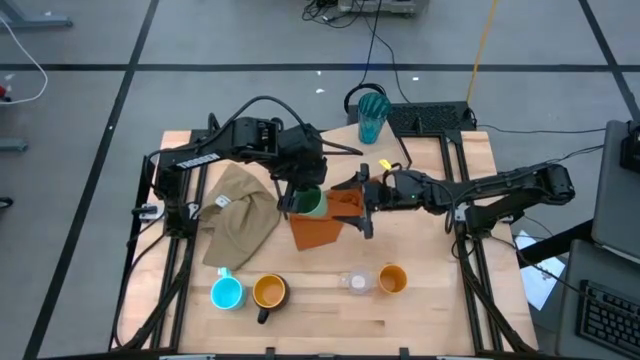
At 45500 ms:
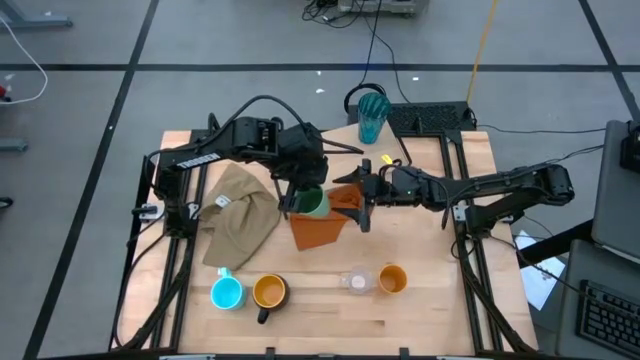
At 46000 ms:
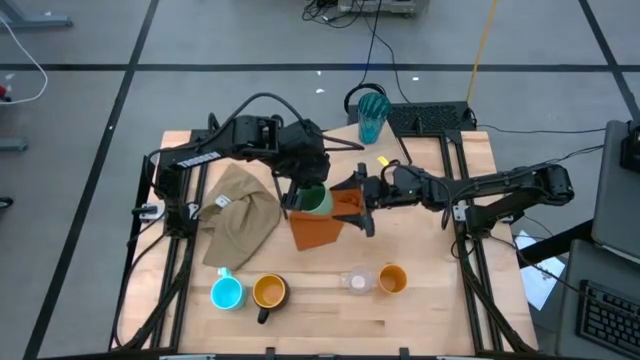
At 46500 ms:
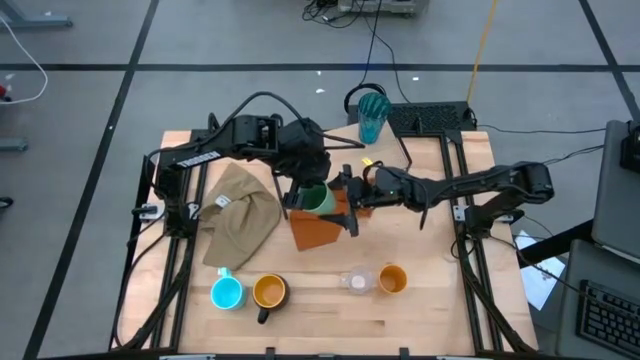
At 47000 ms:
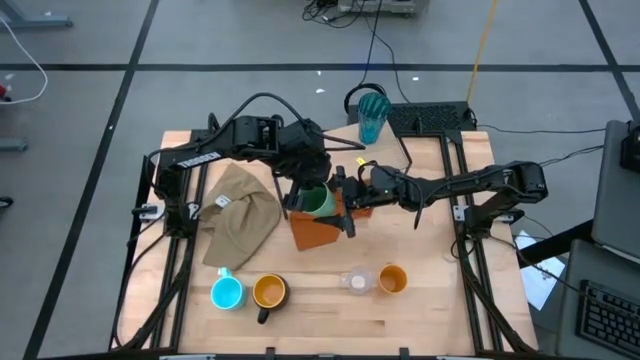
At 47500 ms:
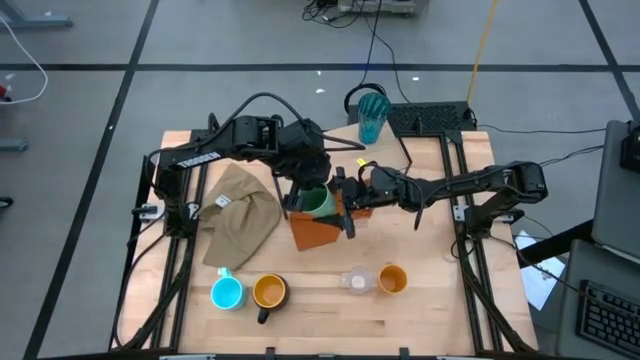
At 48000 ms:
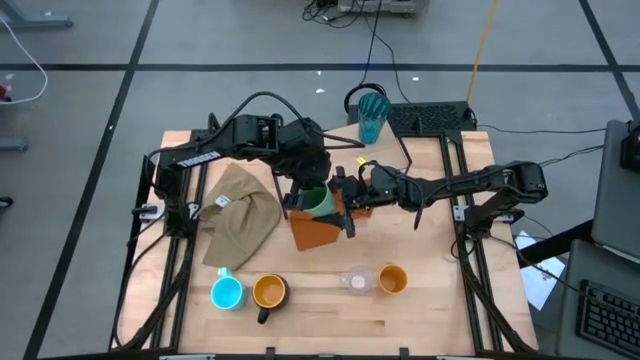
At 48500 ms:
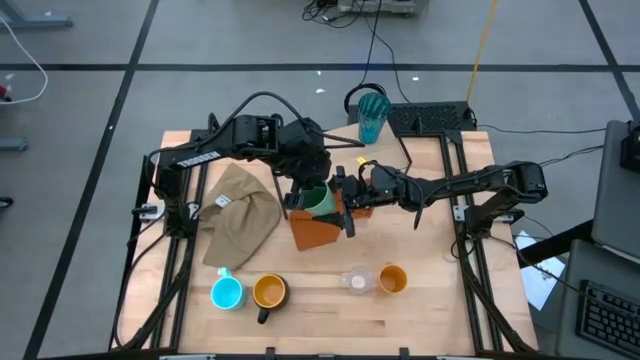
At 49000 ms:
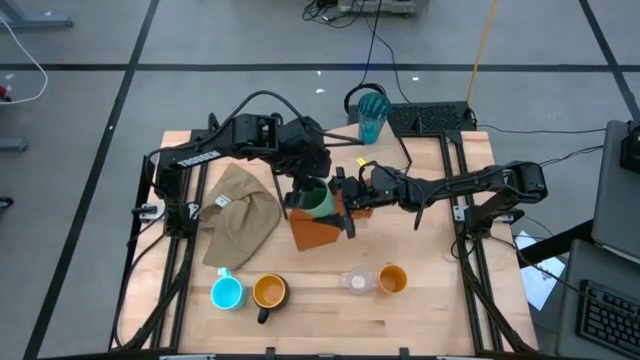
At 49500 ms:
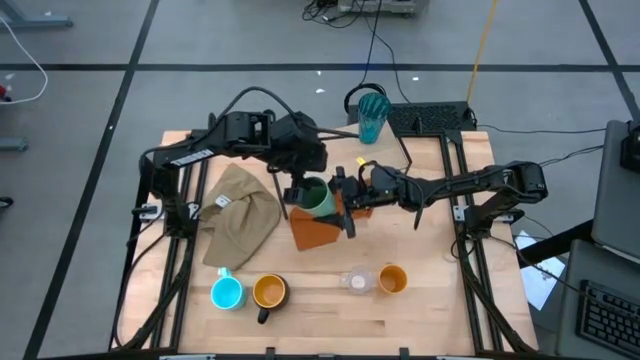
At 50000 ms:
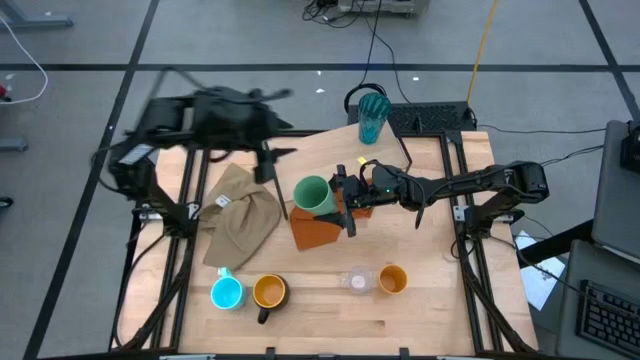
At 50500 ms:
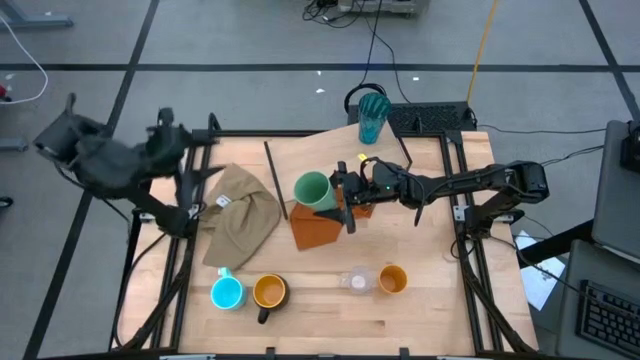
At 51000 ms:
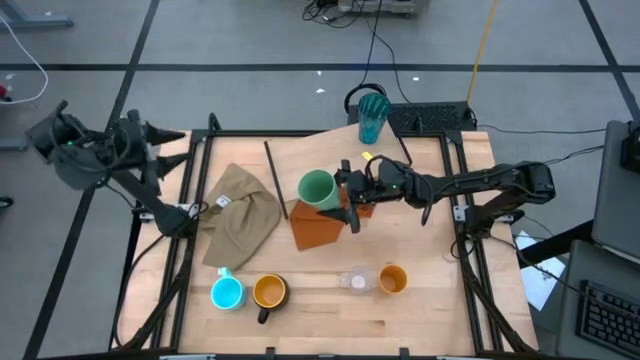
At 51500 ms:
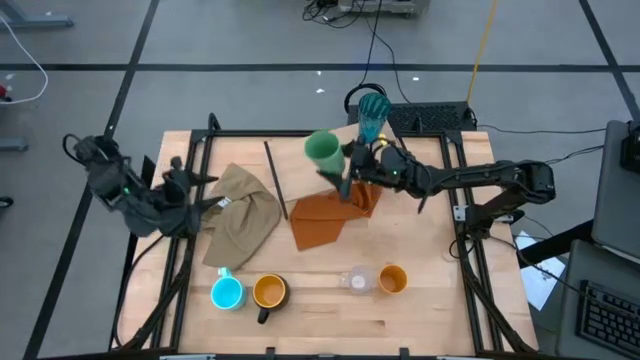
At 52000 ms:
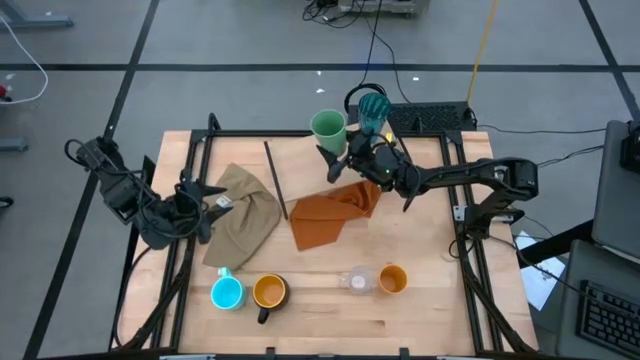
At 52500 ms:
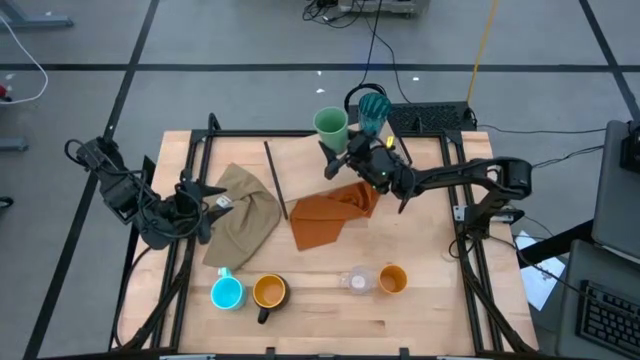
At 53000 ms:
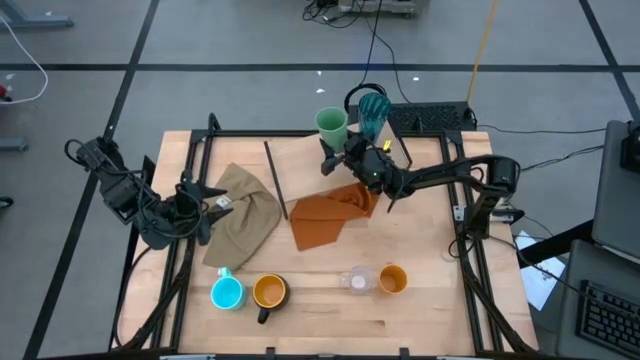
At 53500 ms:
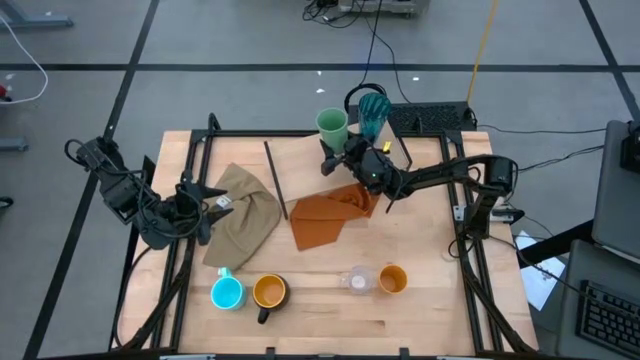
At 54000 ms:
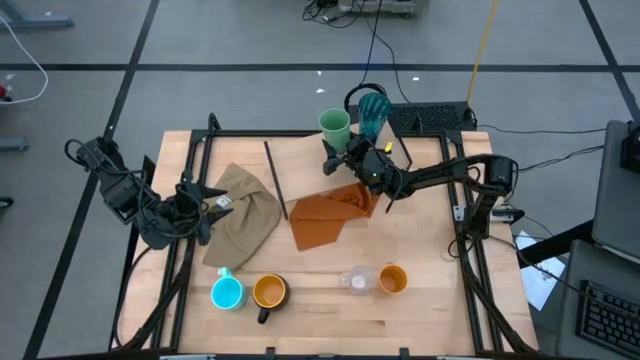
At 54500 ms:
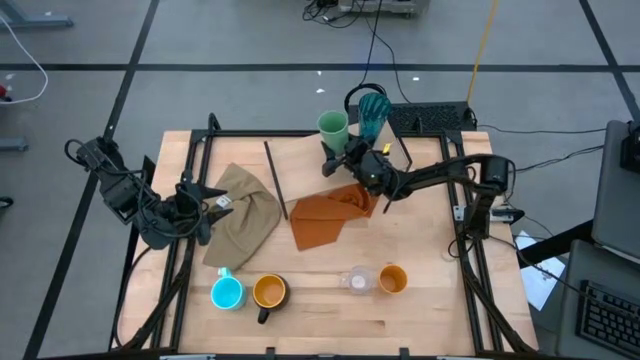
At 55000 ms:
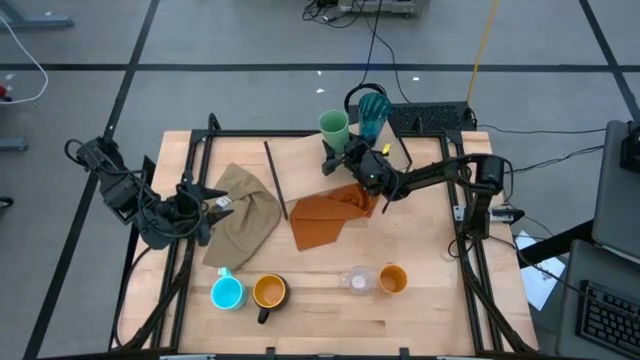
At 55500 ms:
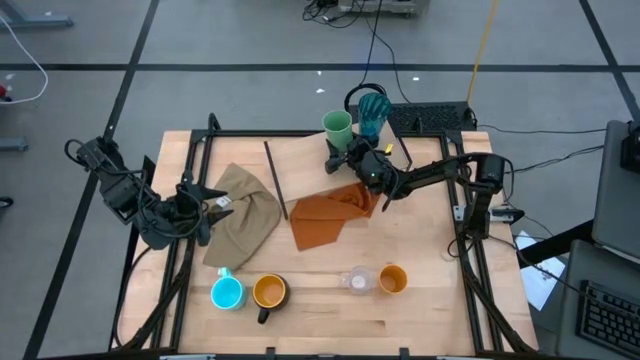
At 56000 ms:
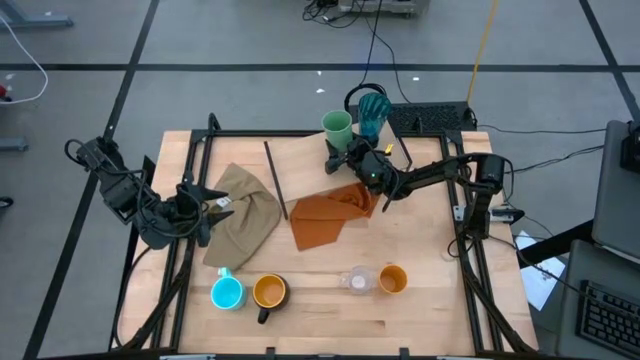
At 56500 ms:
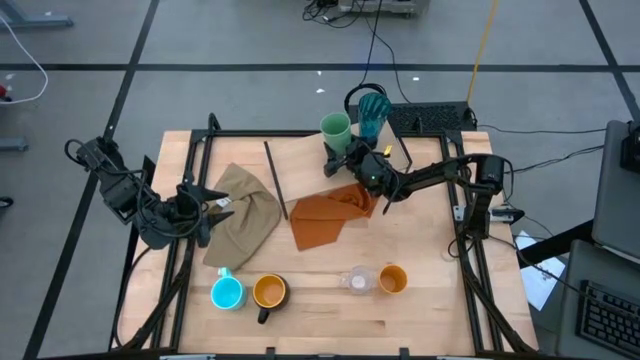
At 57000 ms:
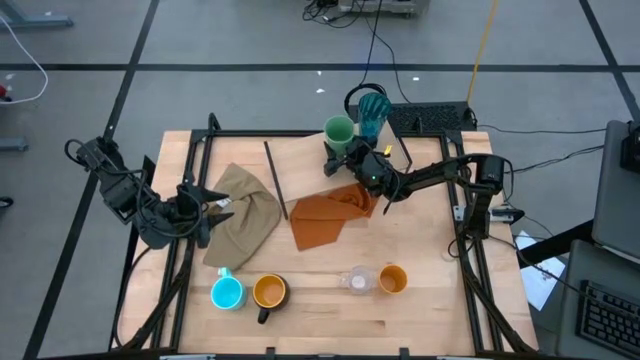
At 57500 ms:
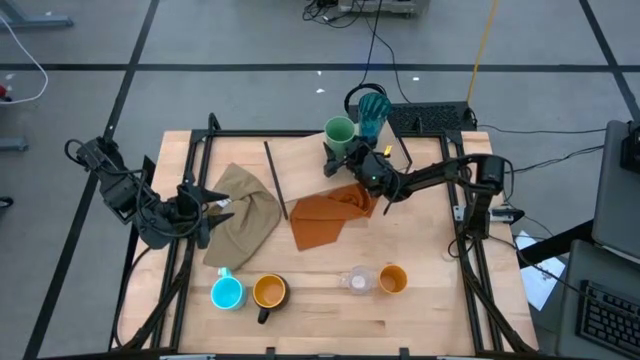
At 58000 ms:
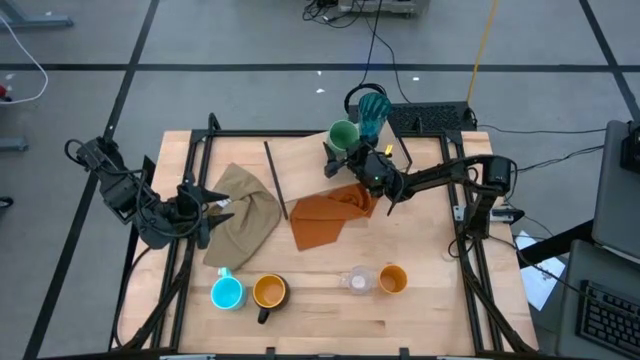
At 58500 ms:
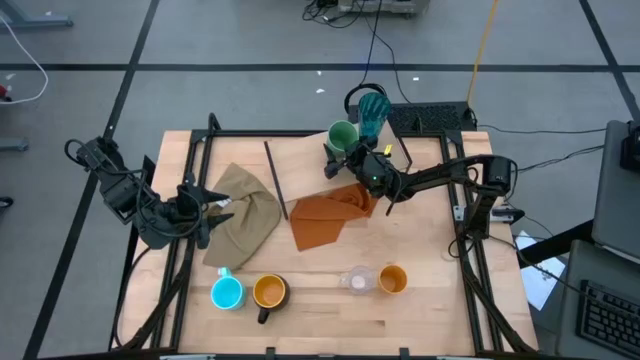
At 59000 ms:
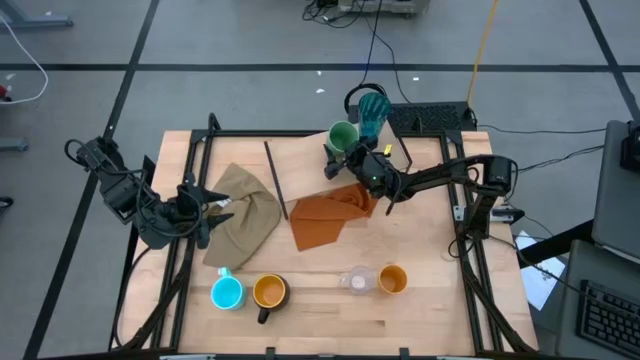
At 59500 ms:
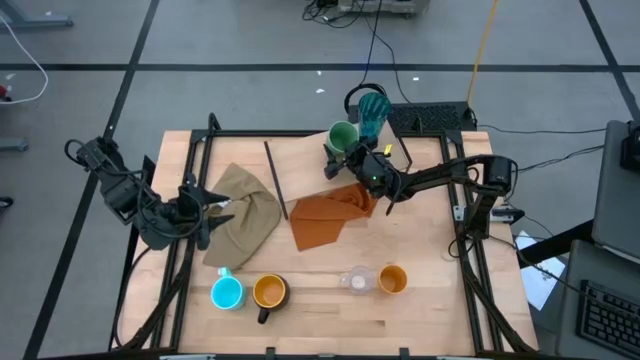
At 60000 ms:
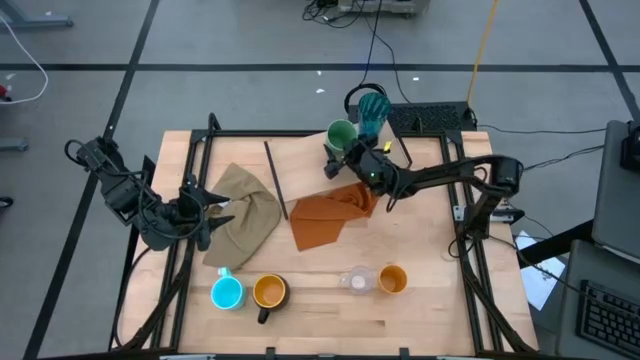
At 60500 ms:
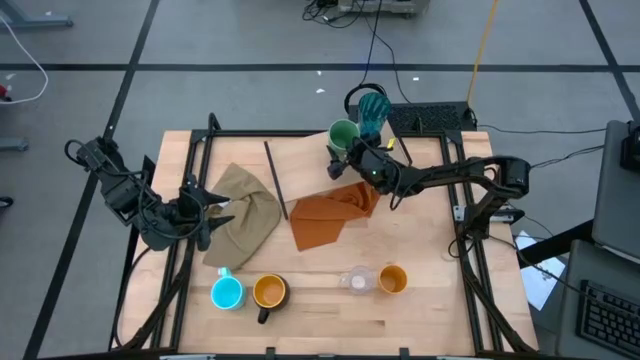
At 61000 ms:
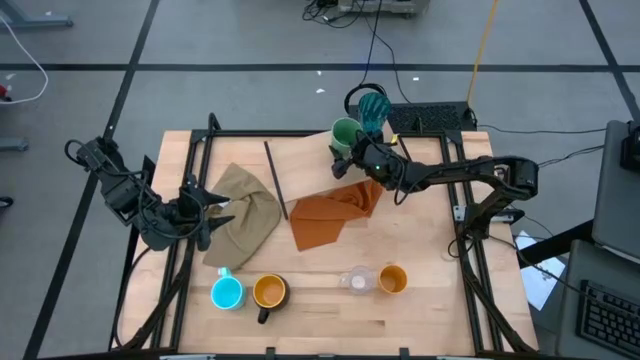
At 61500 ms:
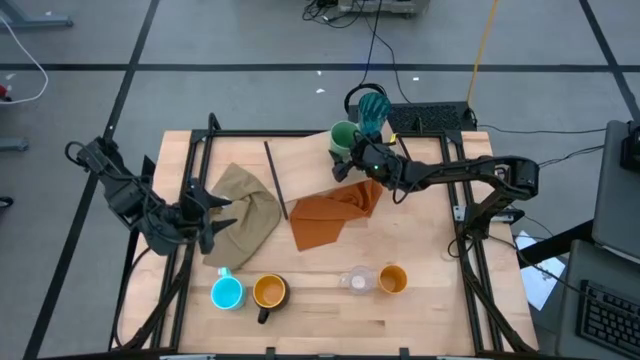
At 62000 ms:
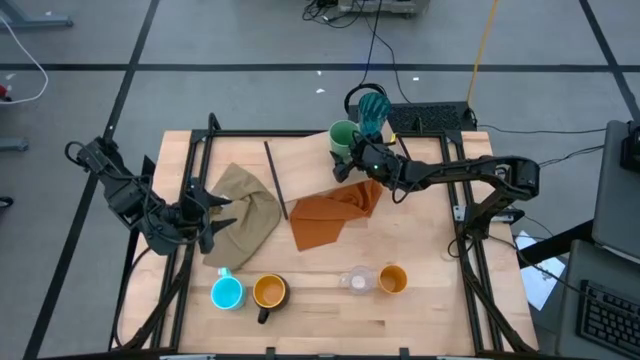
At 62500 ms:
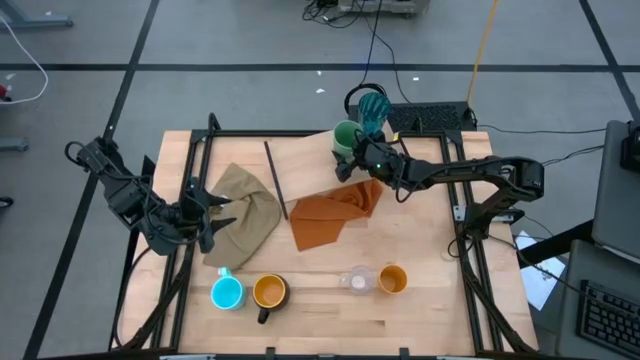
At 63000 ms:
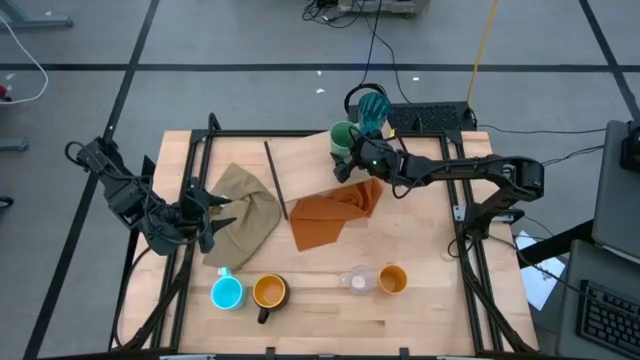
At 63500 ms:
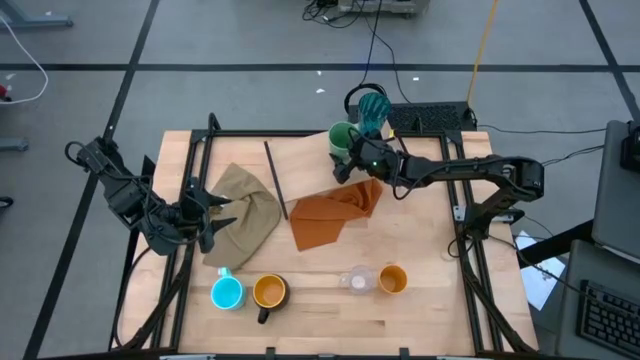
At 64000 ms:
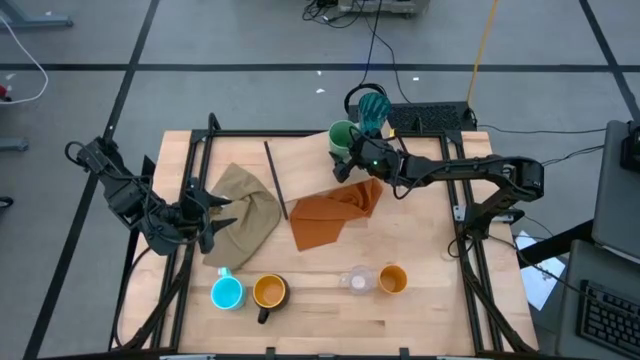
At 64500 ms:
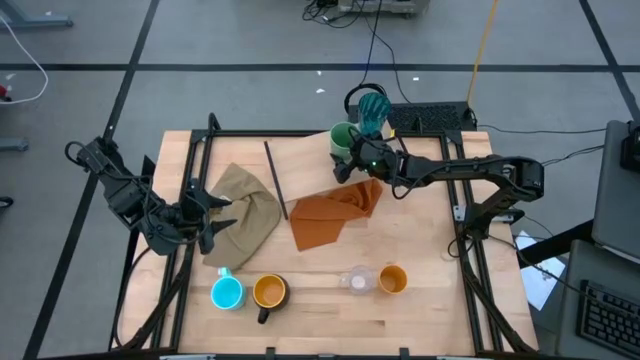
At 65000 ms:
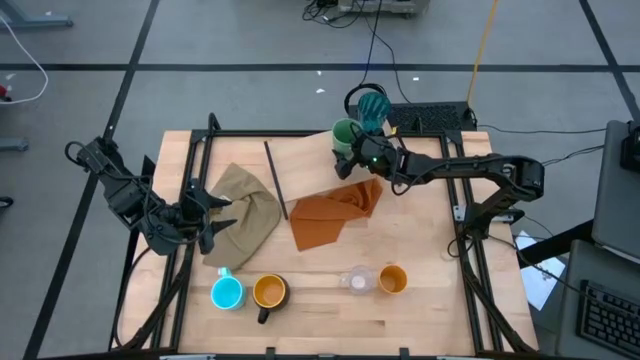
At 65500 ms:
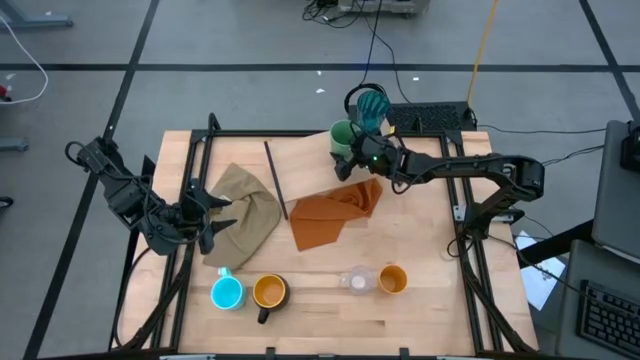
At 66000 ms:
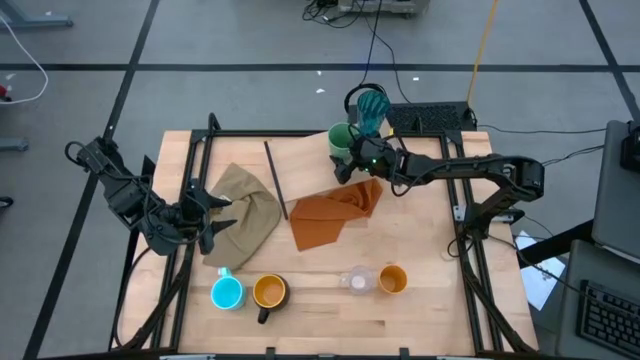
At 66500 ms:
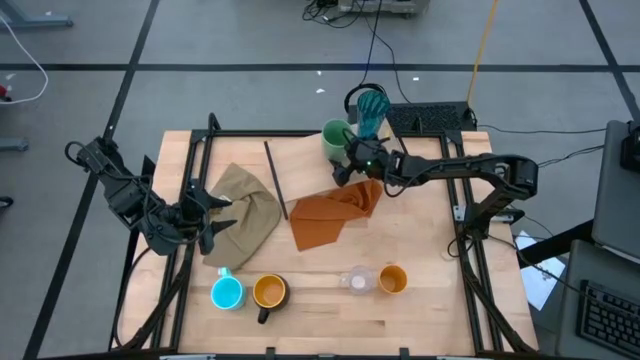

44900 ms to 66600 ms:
Task: Stack small to large cups/mugs on shelf
Put the green cup on the shelf
